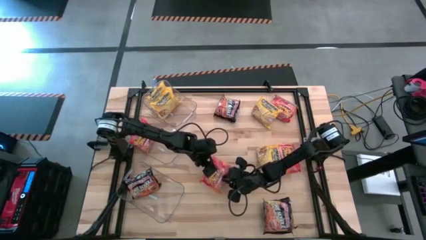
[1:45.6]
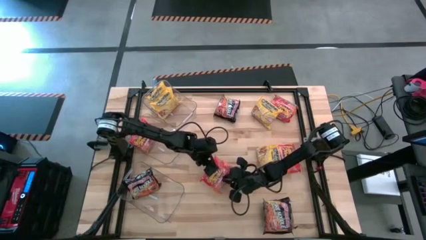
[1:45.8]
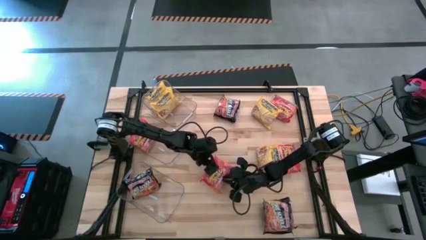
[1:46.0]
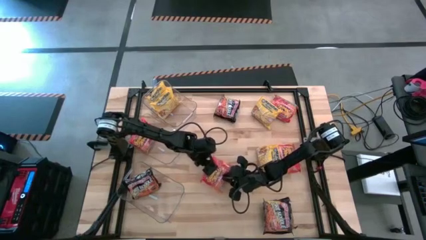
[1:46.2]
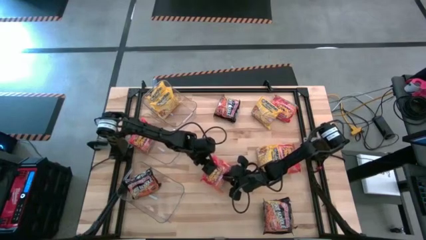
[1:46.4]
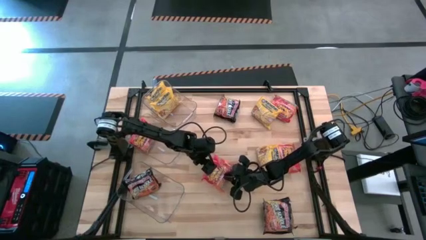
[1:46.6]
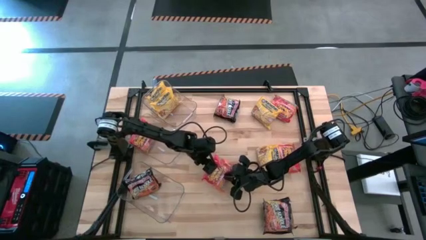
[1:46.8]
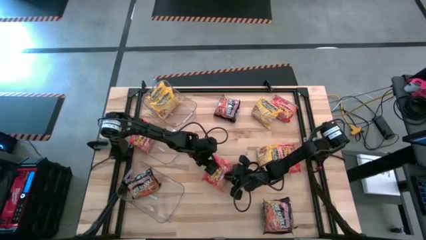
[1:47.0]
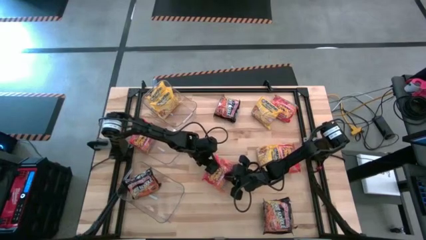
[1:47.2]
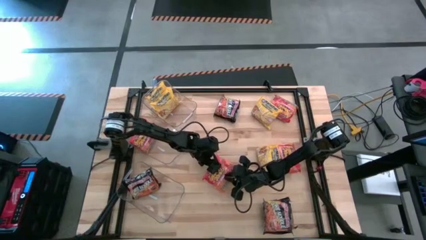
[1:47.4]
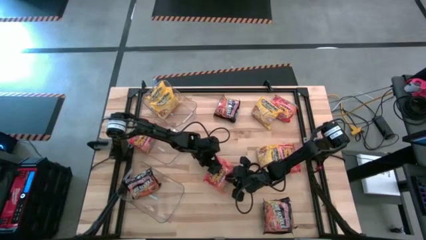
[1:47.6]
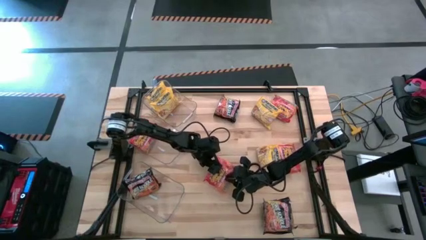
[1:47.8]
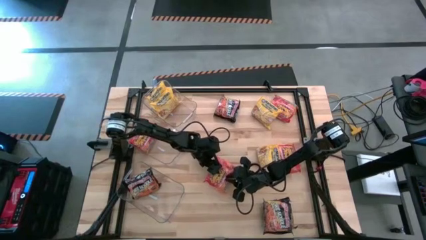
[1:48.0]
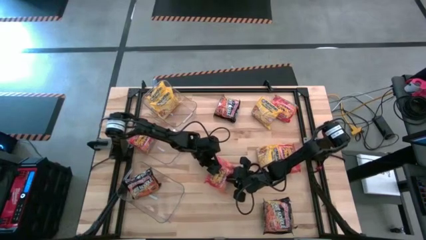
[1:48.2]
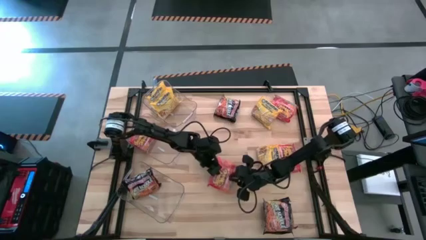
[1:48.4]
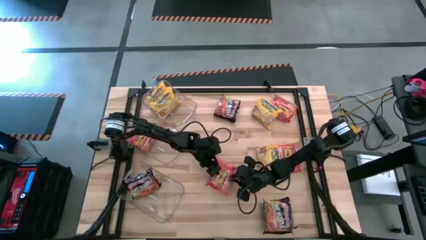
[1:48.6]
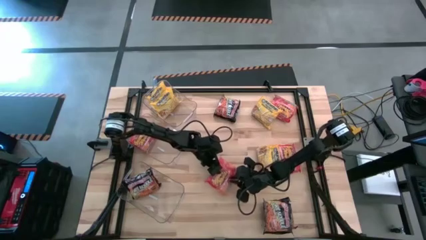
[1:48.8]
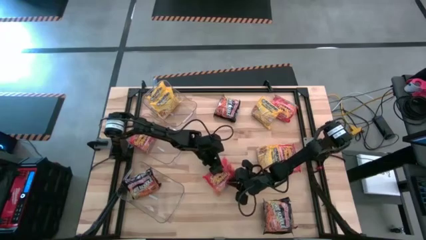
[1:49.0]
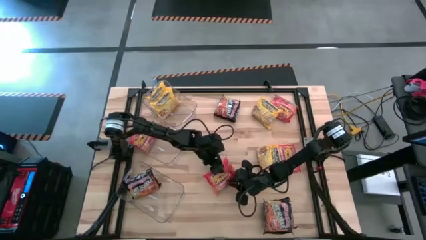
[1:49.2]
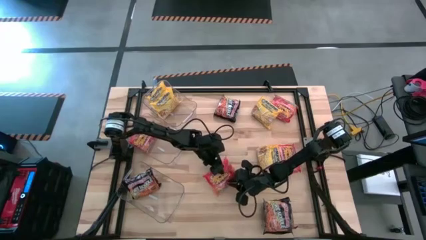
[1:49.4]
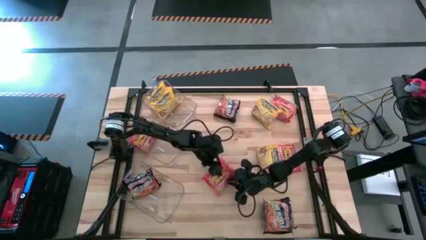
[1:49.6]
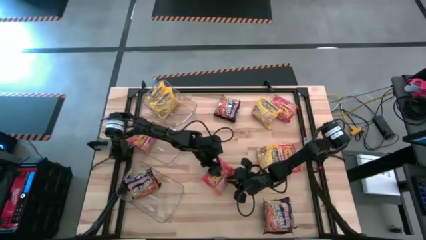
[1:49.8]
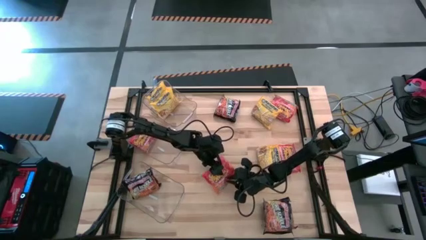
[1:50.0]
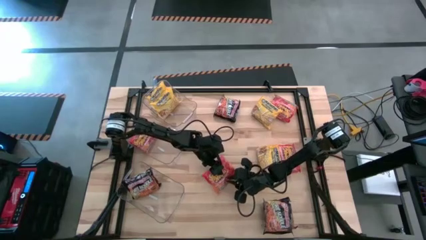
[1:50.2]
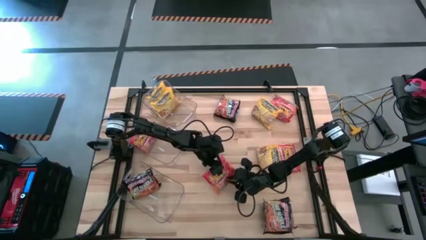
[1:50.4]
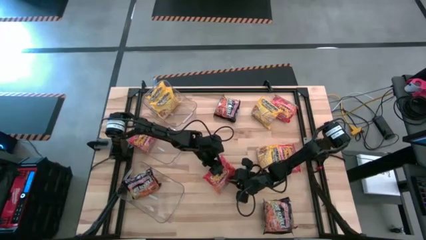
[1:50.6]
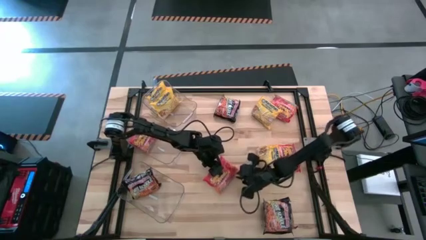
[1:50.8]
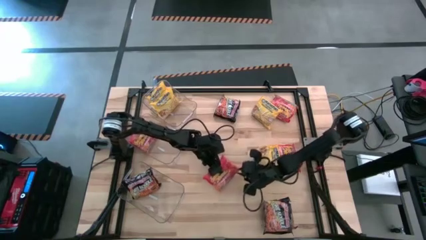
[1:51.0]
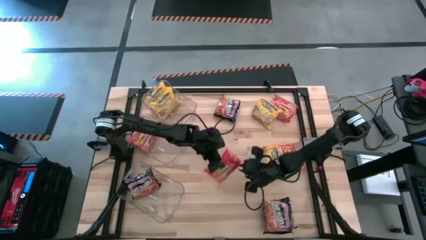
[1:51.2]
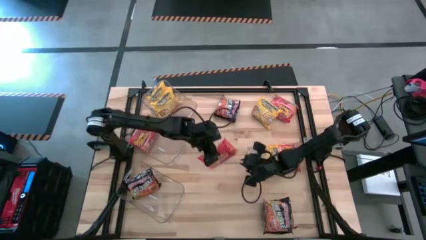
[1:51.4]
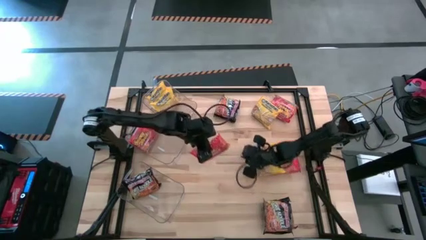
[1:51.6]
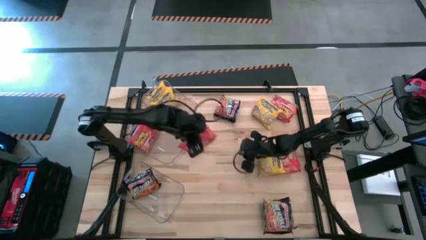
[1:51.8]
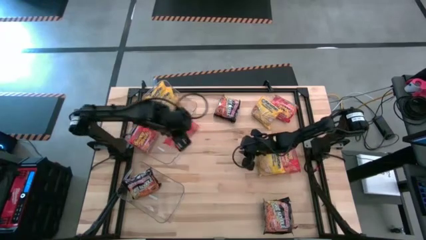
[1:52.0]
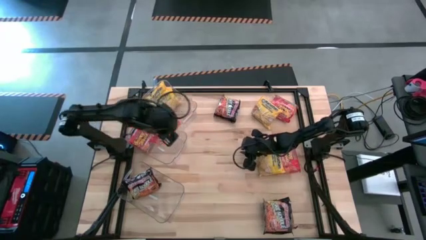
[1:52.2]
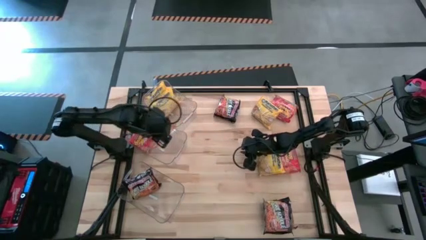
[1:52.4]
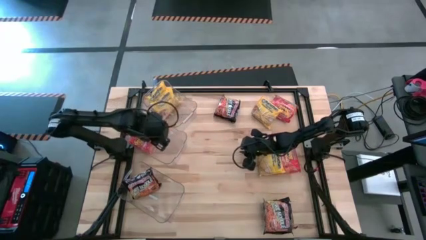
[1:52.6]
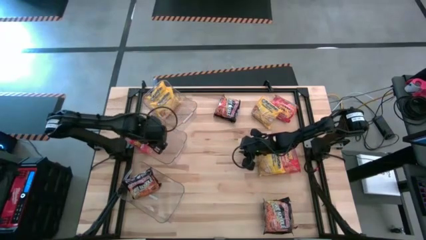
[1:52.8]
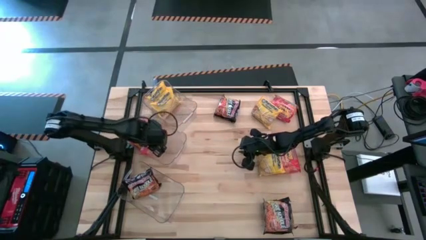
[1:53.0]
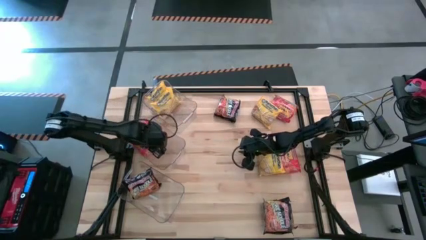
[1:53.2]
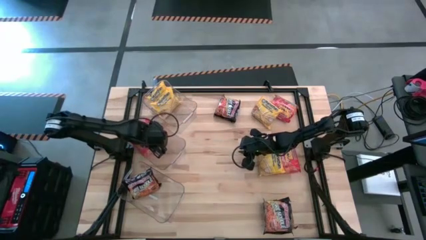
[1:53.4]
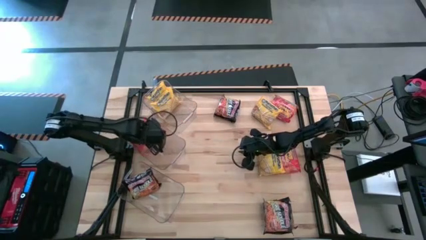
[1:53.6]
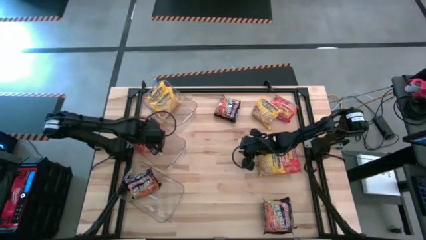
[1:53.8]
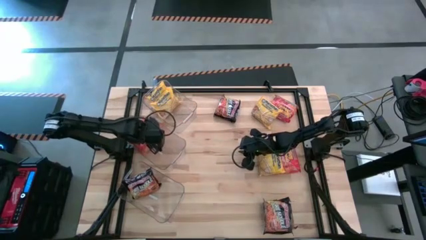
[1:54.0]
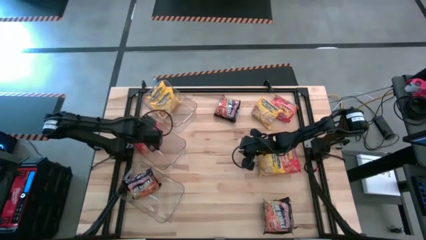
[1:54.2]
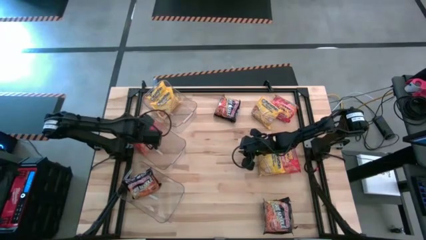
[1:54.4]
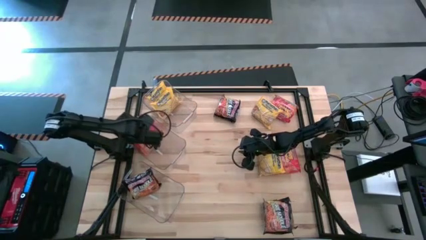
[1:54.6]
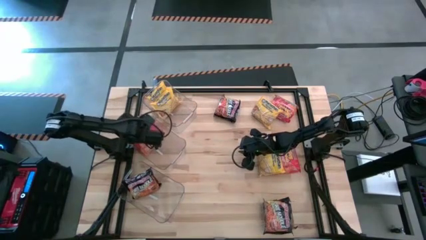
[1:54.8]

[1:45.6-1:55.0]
Task: Sort Maruchan noodles
Put the orange noodles pack into the middle transparent bin
